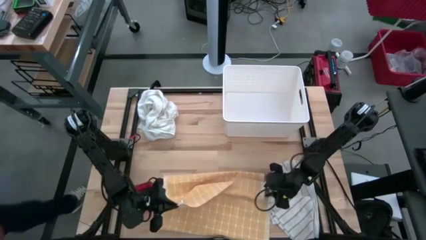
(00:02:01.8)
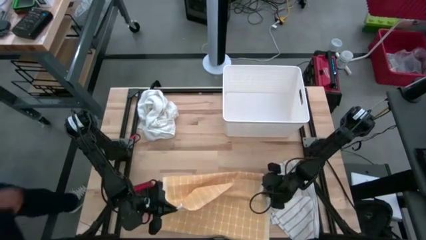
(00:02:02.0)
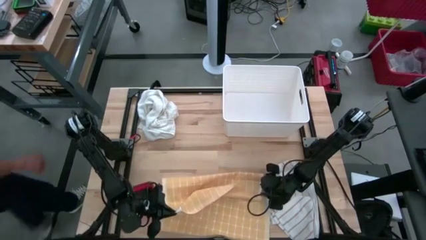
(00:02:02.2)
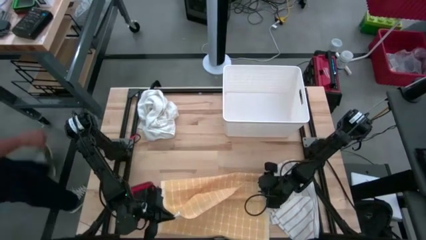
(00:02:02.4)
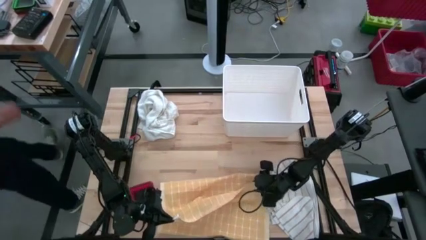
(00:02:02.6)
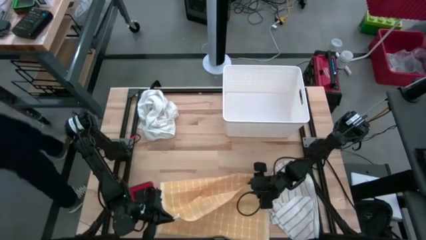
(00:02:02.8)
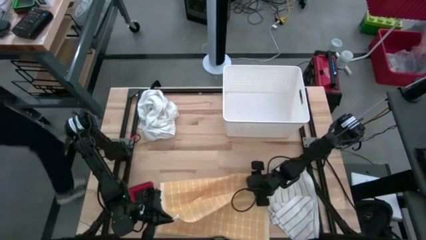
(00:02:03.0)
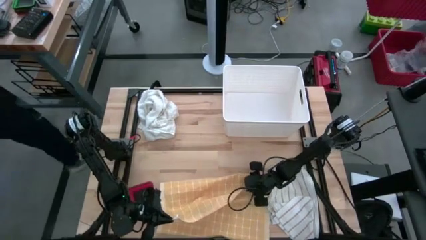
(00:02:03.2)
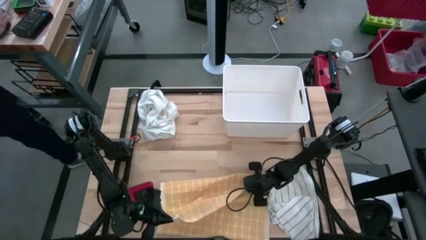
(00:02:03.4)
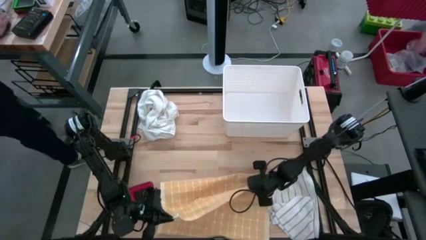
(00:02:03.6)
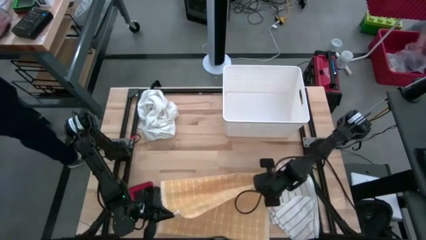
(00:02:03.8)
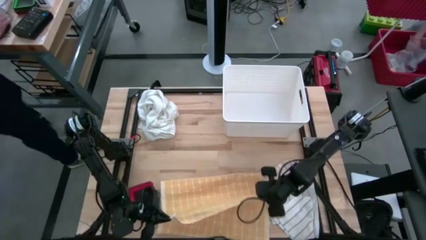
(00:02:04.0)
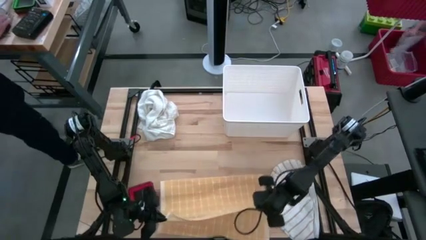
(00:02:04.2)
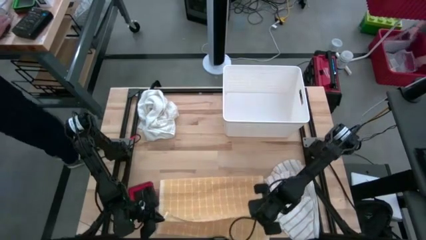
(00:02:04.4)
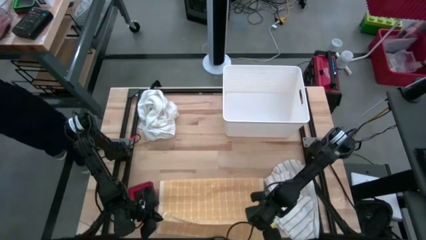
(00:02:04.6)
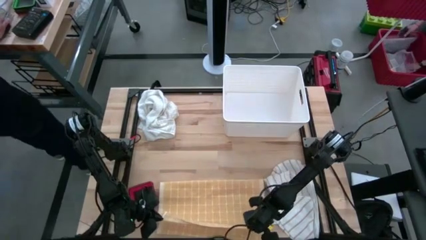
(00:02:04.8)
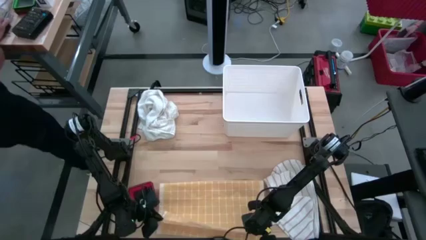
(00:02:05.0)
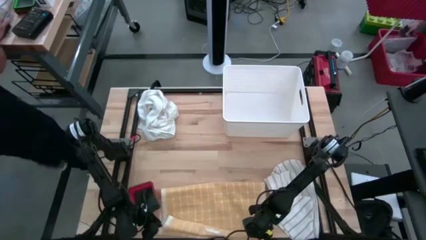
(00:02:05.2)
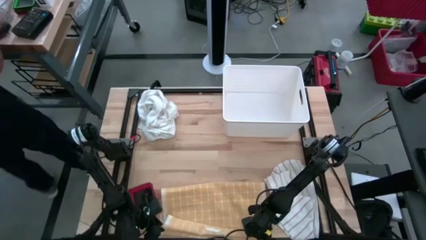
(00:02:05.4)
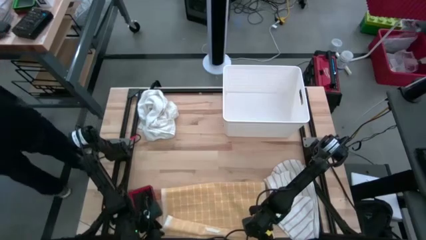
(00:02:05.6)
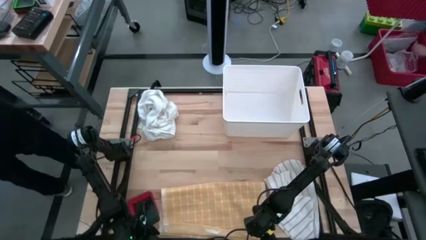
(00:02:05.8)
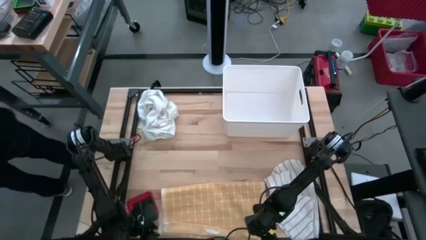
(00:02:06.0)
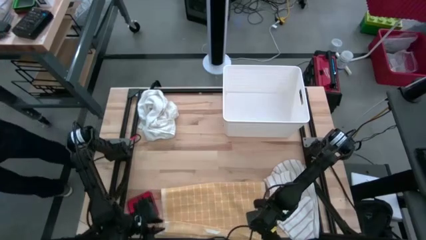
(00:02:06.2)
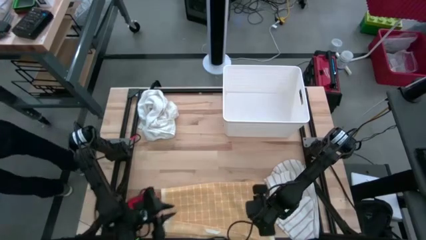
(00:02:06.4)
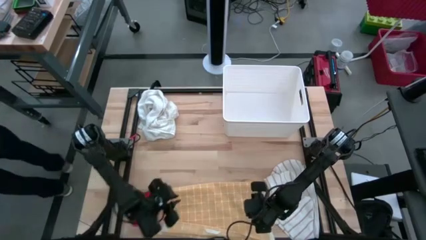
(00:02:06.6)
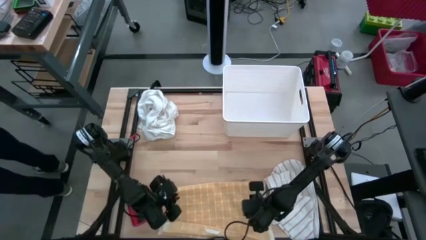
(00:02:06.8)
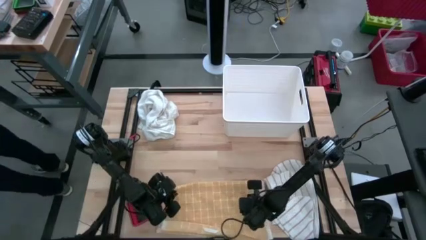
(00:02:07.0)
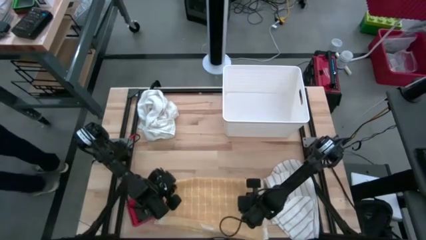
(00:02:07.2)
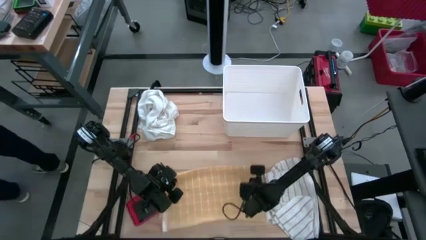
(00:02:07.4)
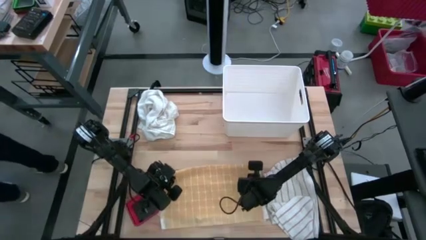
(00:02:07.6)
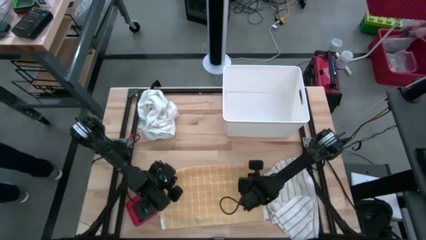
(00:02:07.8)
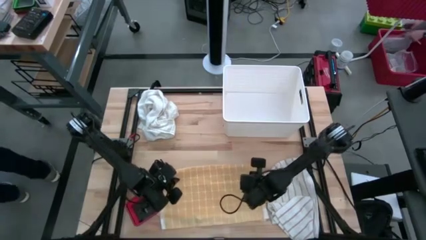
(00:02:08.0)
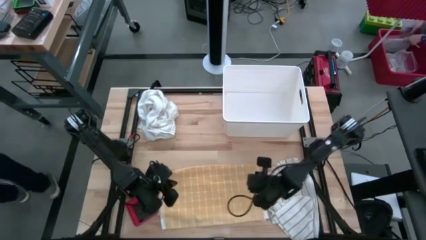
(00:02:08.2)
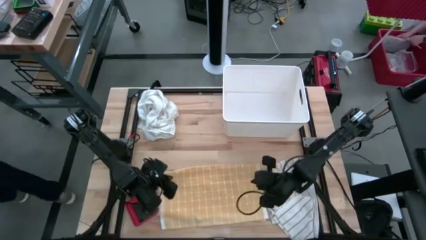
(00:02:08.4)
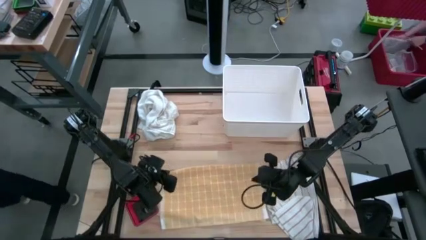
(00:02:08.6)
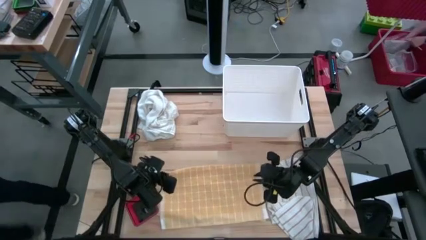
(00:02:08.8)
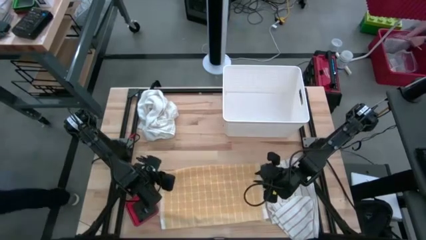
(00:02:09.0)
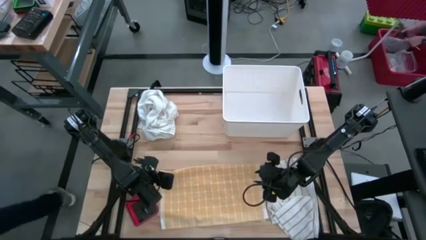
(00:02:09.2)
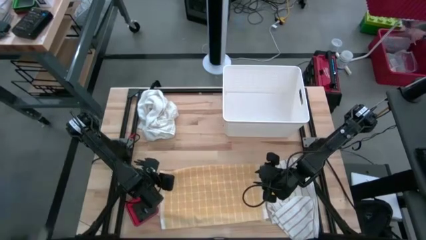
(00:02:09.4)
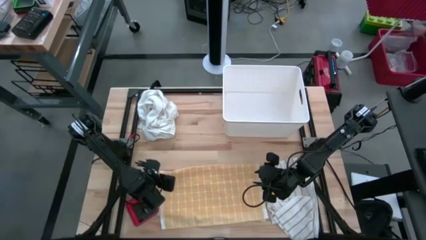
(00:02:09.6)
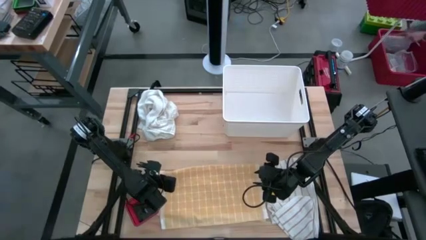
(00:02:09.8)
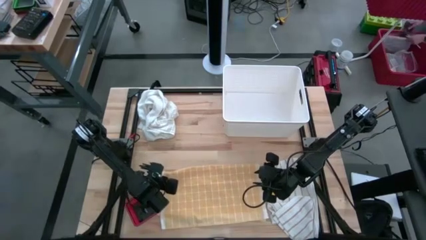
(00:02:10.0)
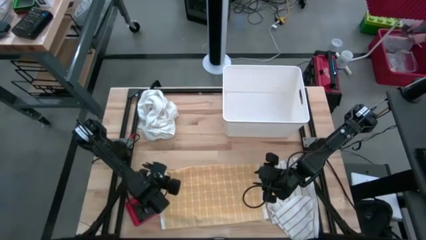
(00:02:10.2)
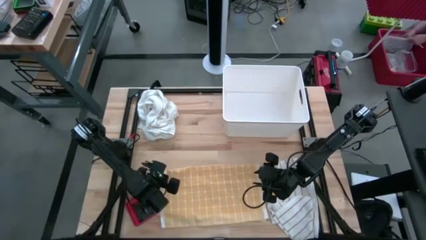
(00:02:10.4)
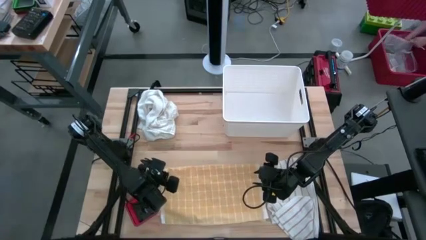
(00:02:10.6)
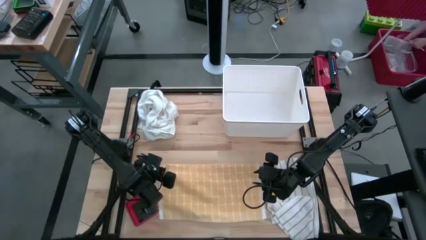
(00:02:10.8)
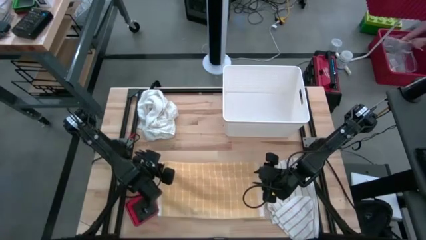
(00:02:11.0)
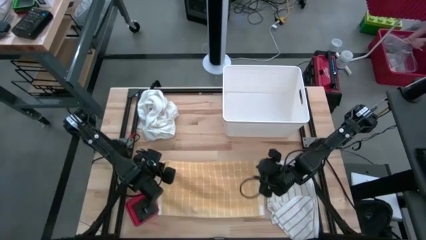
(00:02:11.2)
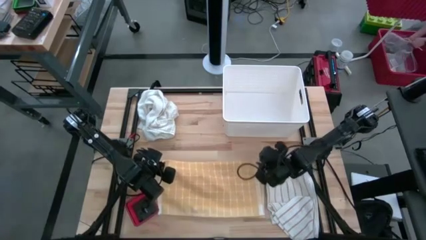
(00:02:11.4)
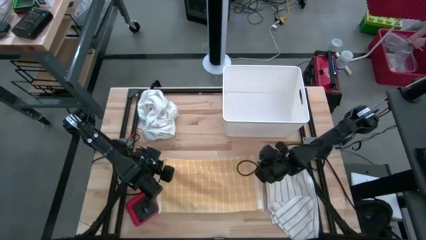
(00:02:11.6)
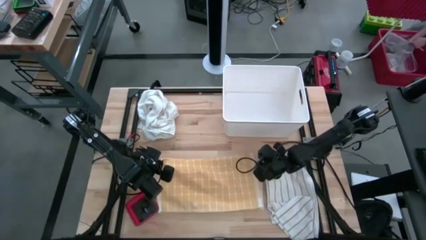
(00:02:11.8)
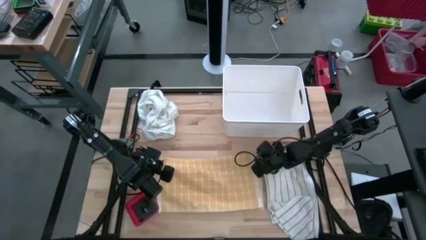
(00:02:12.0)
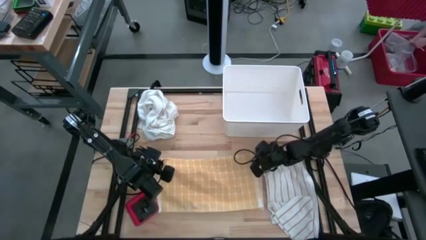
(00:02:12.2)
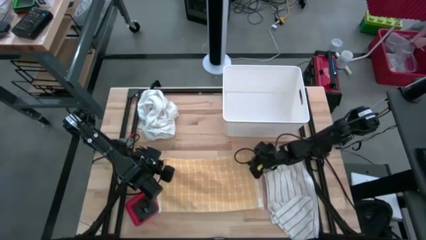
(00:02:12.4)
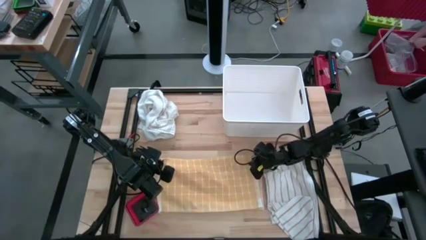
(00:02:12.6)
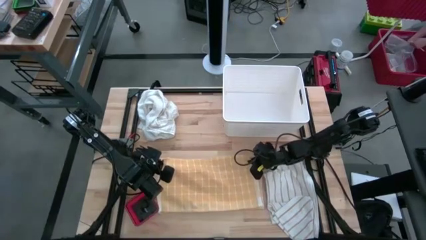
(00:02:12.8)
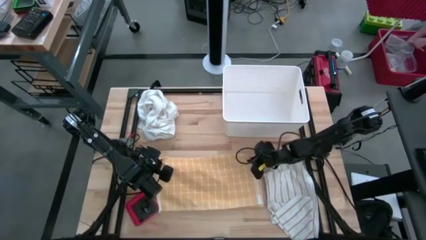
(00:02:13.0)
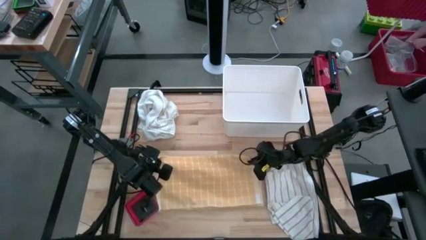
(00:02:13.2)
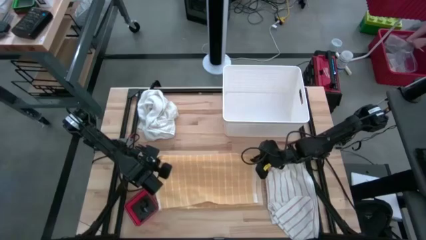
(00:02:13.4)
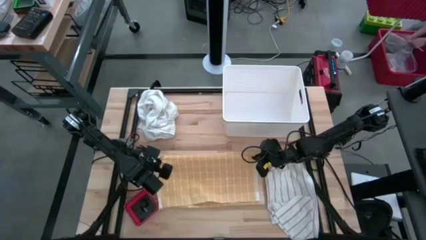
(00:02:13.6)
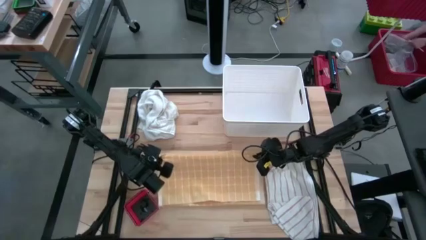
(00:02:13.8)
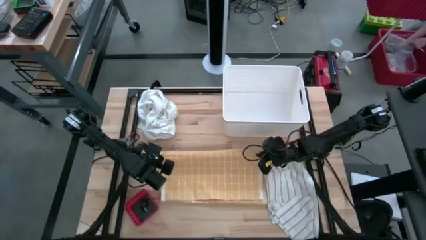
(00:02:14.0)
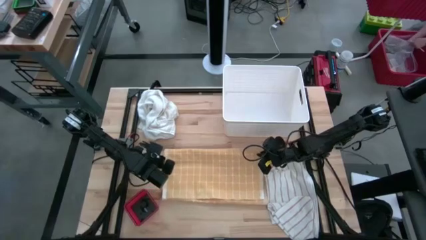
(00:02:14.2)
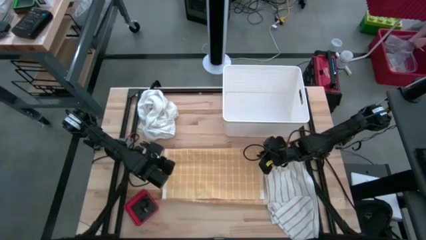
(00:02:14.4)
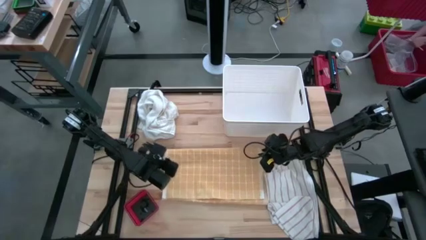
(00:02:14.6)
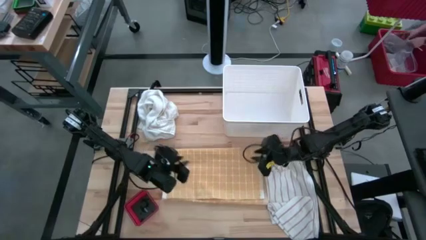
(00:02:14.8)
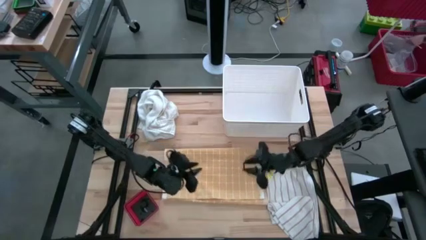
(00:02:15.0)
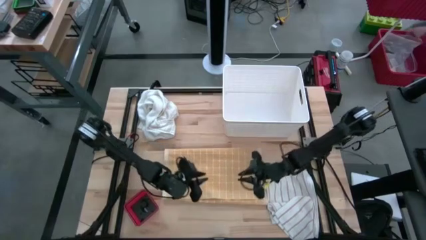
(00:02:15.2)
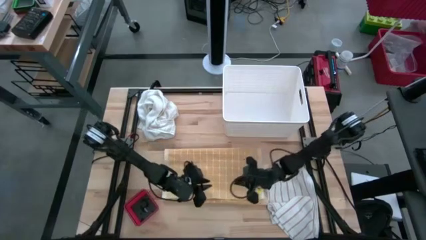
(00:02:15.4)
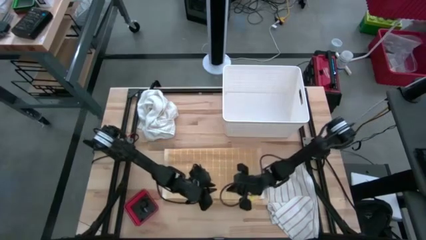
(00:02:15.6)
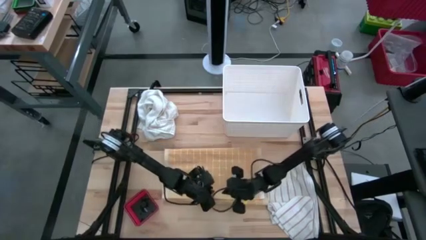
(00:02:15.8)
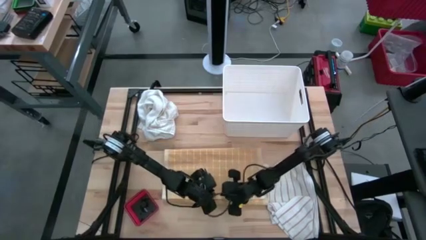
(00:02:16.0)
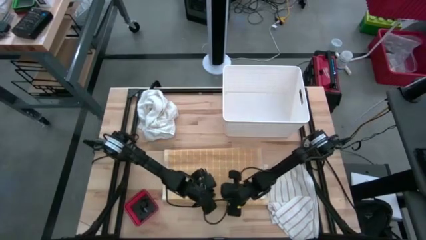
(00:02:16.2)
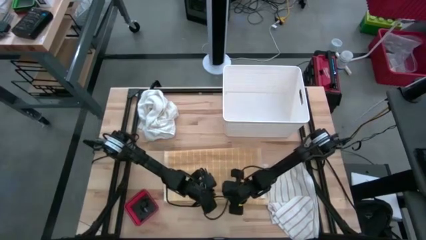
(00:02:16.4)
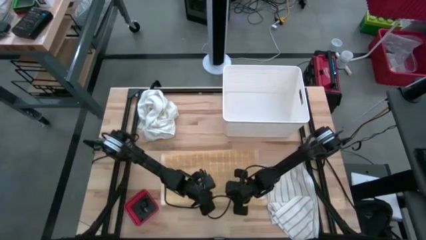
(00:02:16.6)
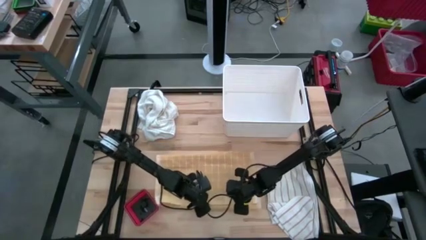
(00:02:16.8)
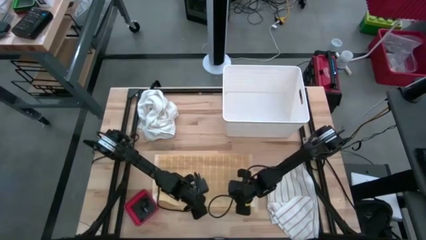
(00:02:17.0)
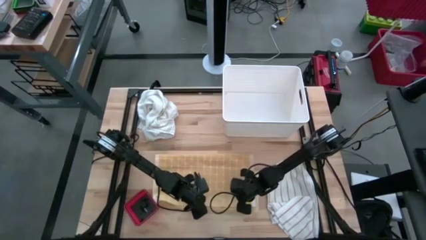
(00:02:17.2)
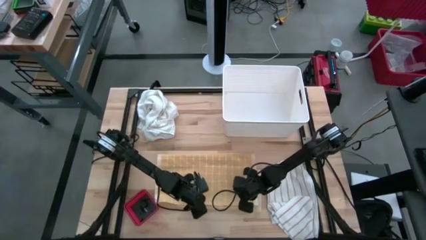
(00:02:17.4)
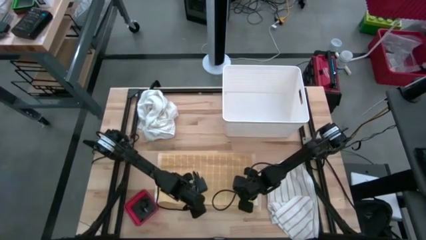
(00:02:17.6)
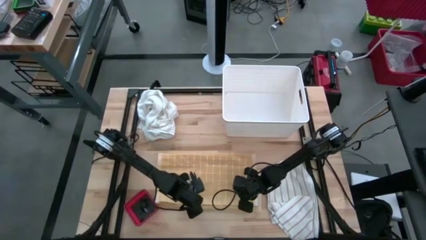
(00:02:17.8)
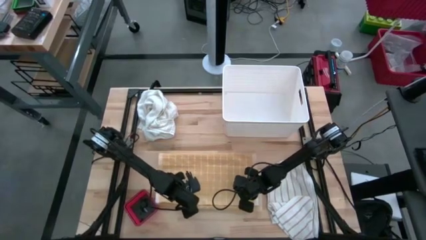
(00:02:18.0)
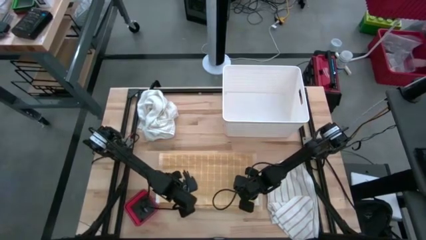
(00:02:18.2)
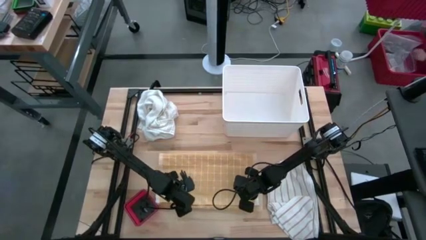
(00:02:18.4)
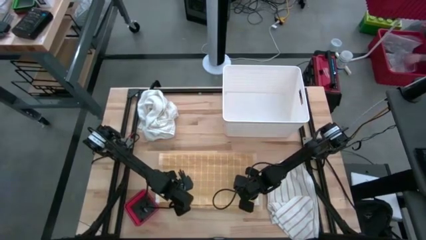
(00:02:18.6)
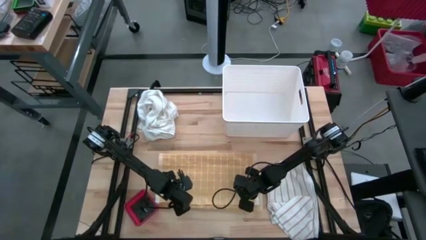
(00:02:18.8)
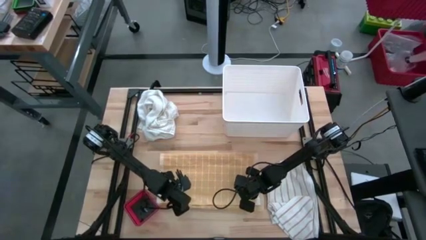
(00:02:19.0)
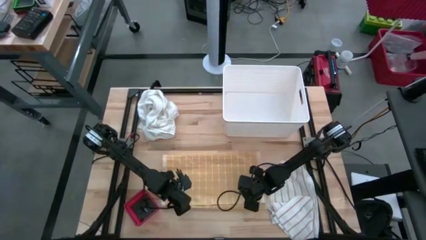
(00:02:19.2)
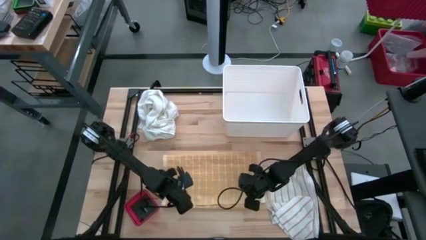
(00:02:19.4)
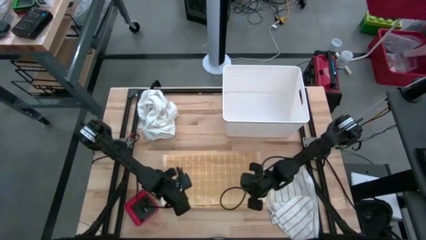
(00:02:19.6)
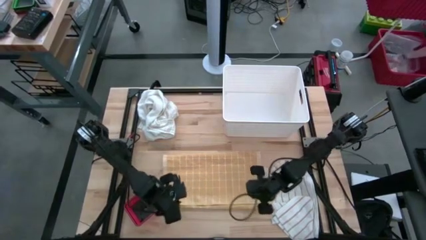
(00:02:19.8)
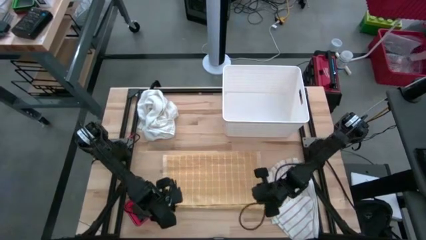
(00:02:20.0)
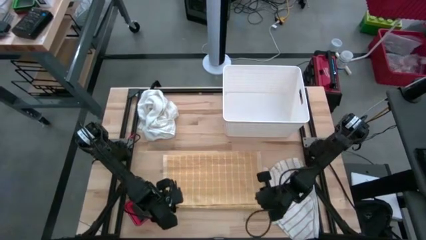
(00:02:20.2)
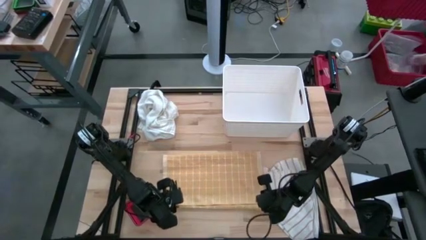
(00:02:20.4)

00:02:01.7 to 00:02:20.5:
Task: Fold towel
Fold the yellow kitchen towel
